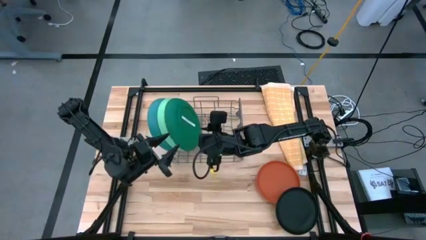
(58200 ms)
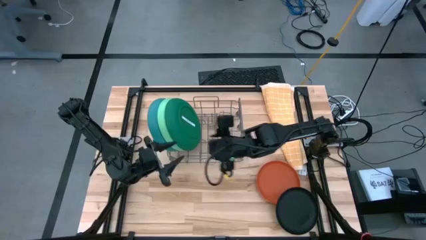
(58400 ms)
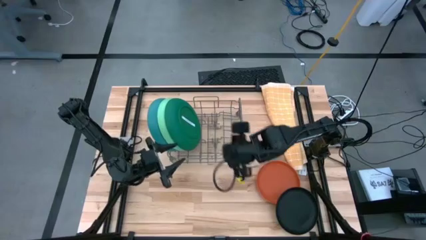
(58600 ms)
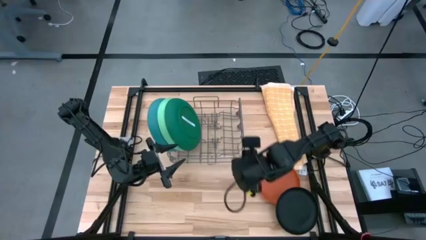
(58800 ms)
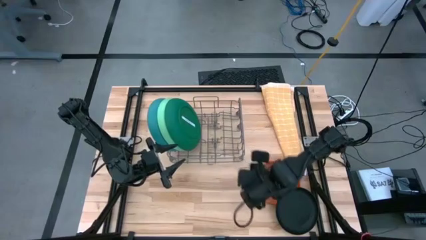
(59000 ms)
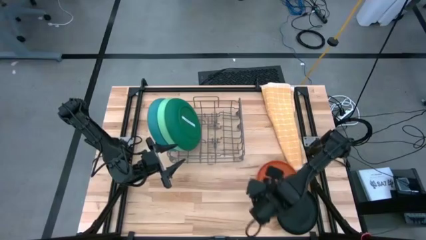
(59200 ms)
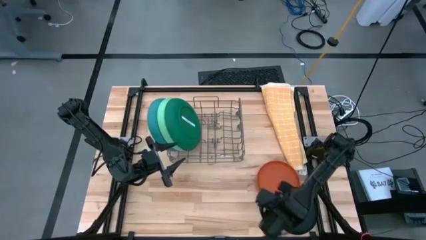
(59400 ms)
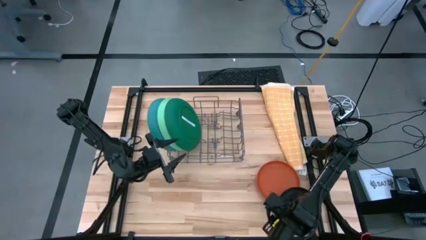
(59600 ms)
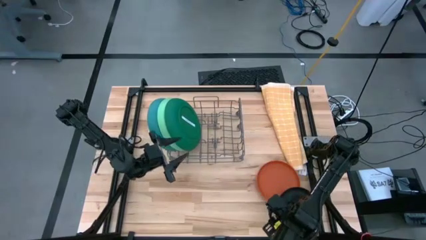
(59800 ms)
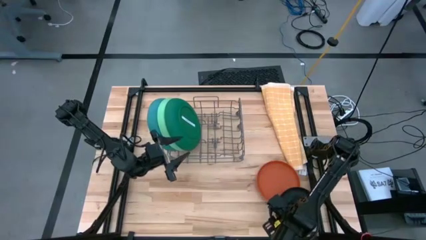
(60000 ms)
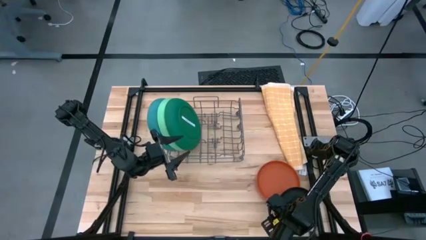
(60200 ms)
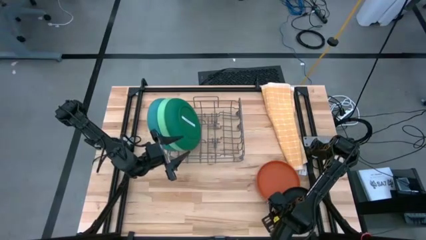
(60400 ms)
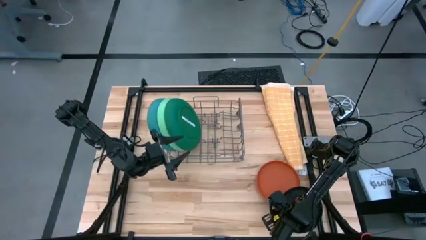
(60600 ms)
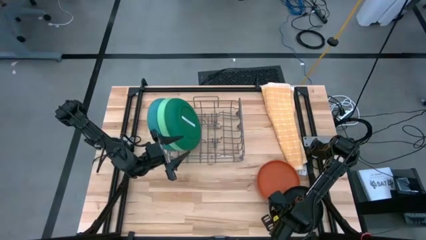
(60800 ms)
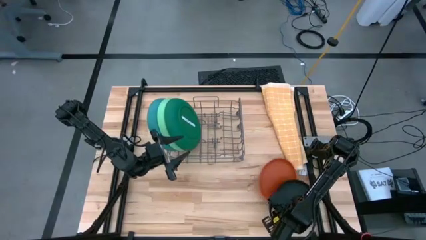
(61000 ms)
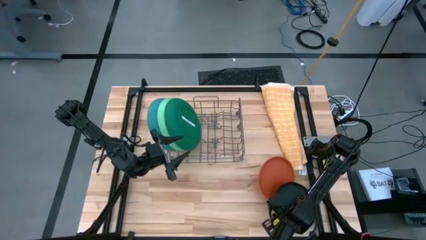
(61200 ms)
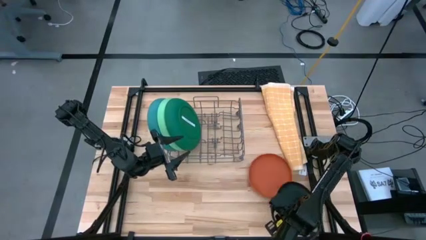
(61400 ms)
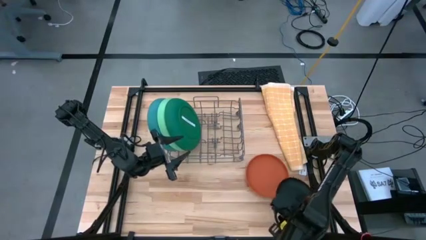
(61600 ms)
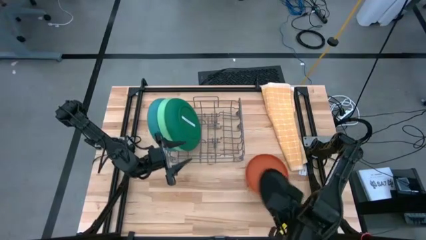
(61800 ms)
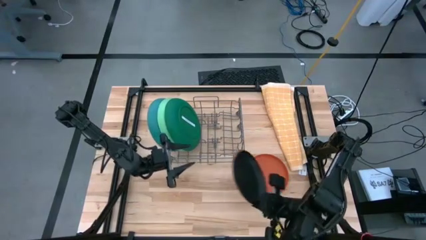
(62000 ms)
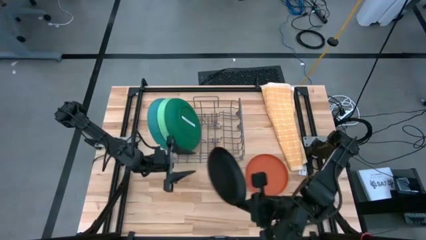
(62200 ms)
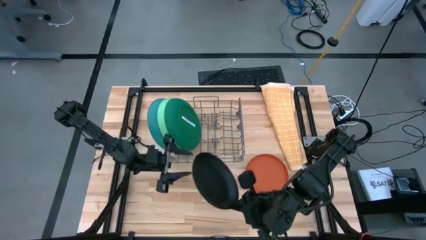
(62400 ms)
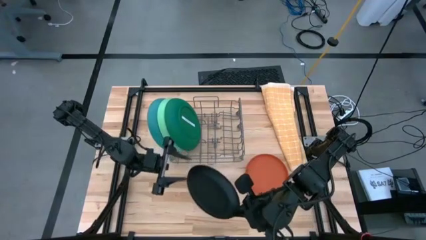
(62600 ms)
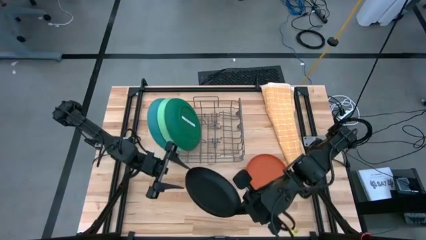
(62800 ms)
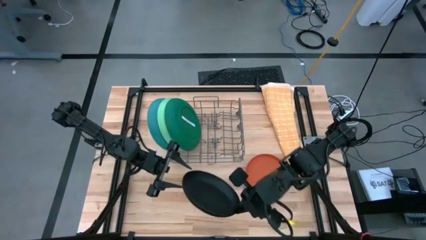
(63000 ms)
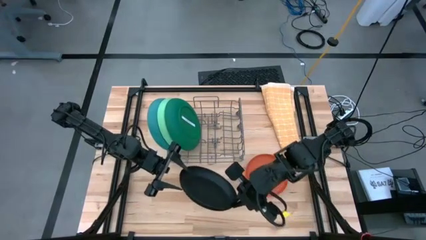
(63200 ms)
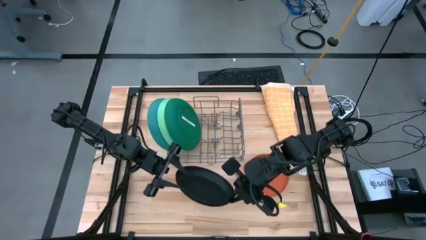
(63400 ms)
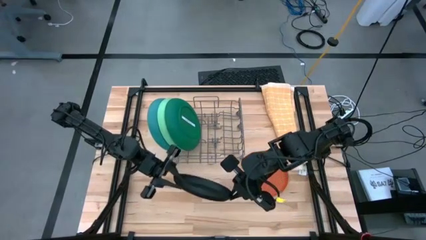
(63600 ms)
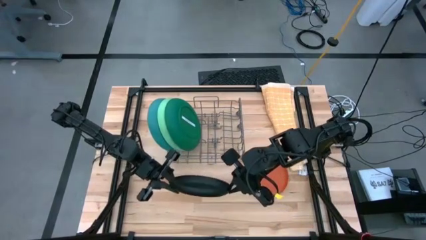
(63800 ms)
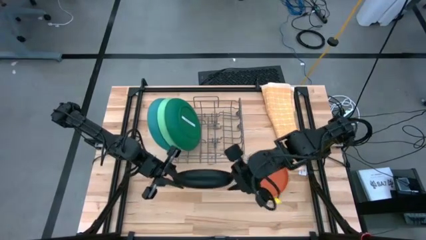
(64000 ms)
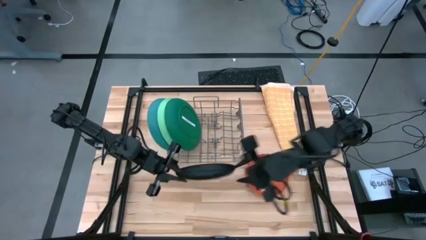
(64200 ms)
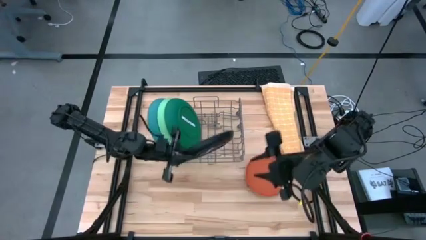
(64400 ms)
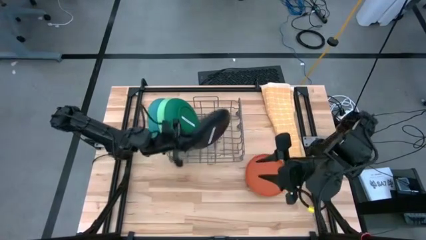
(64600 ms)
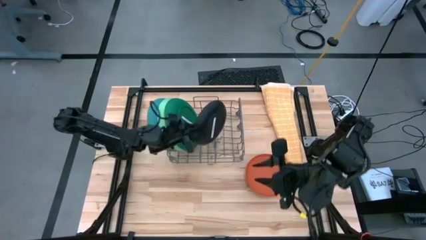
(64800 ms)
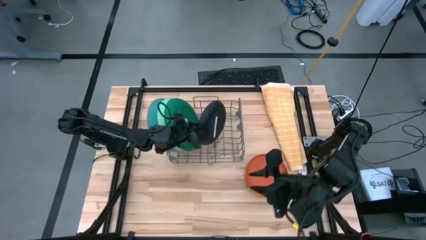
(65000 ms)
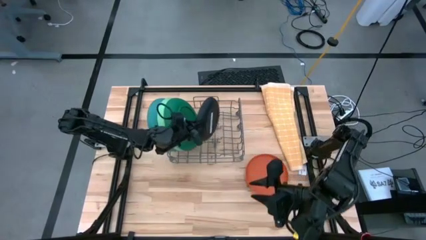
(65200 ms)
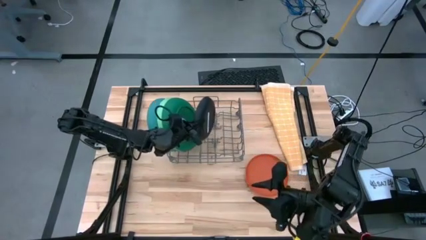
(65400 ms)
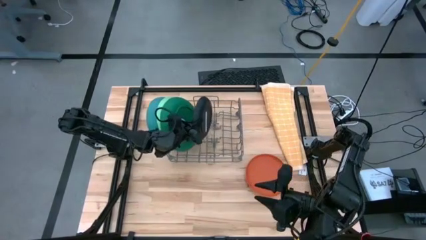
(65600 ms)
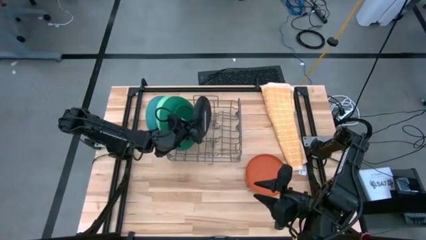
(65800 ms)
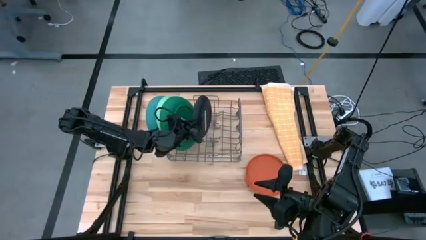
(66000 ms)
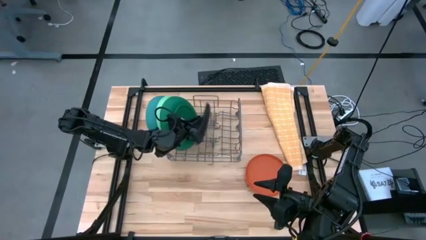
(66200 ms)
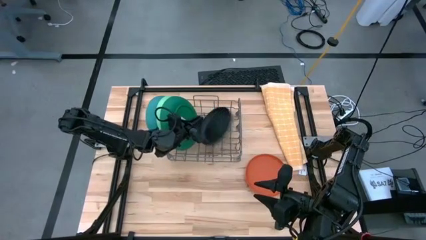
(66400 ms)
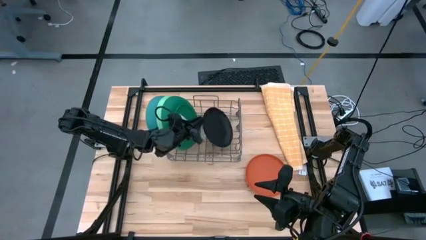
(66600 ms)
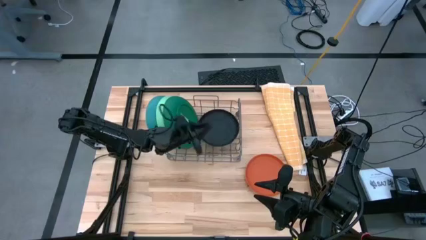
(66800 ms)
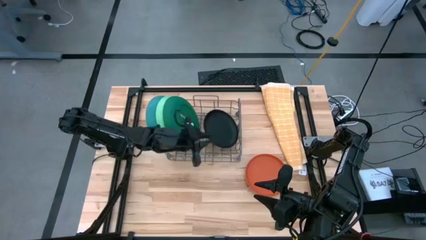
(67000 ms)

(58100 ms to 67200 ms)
Task: Sort dishes
Put the black plate into the dishwasher rack

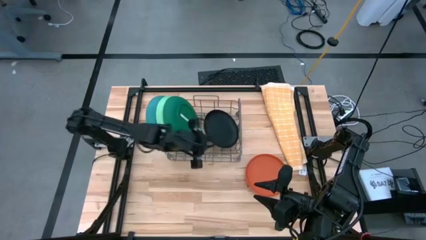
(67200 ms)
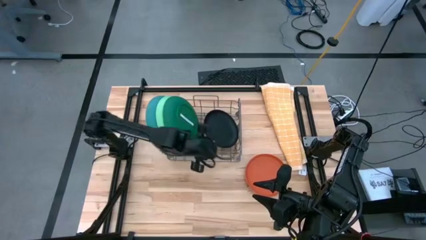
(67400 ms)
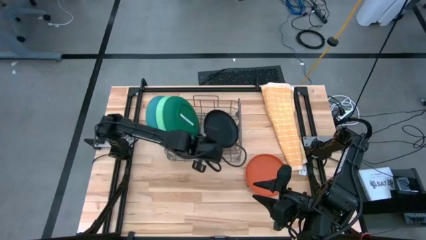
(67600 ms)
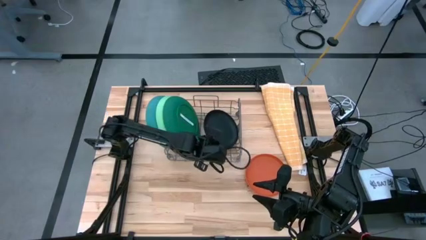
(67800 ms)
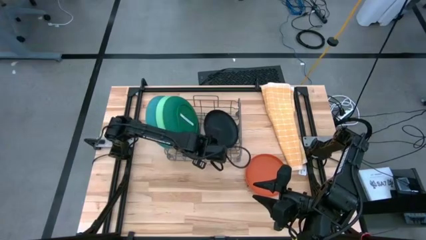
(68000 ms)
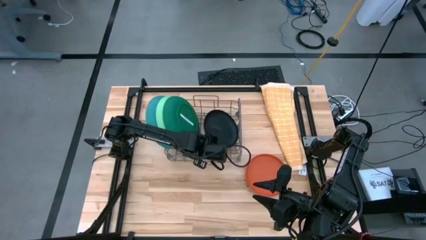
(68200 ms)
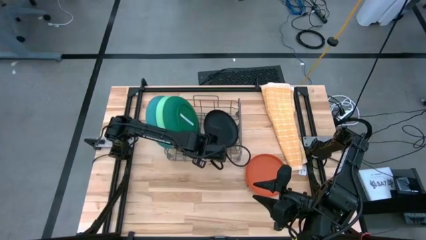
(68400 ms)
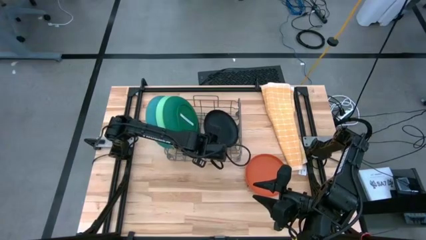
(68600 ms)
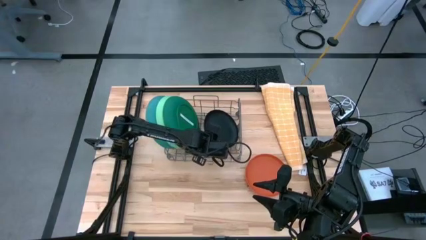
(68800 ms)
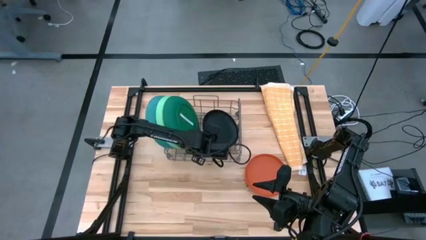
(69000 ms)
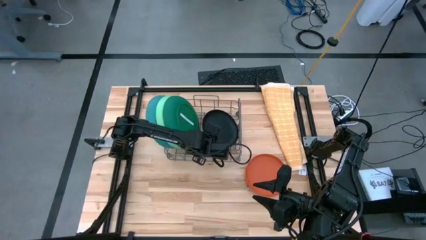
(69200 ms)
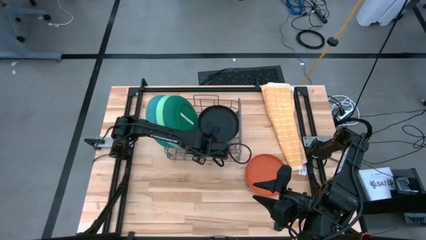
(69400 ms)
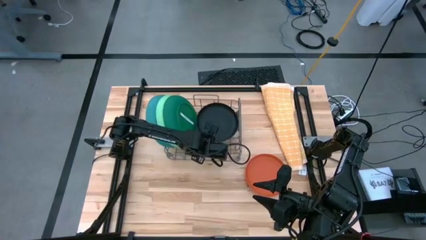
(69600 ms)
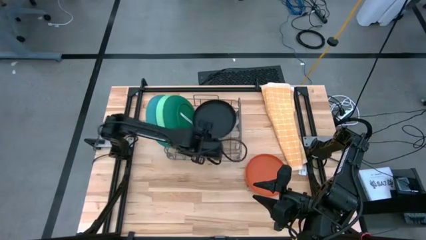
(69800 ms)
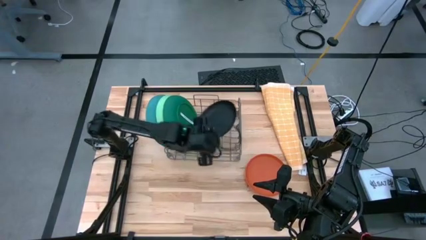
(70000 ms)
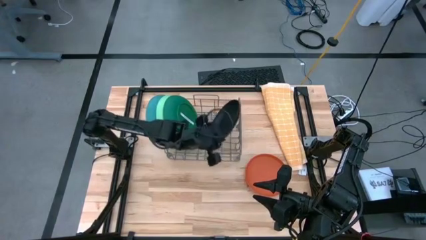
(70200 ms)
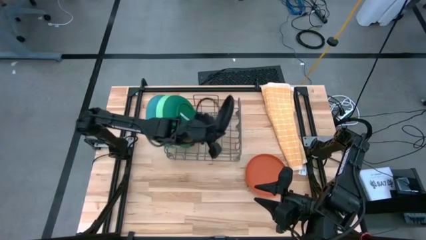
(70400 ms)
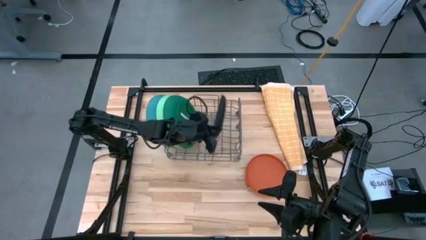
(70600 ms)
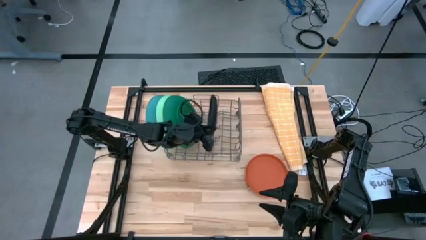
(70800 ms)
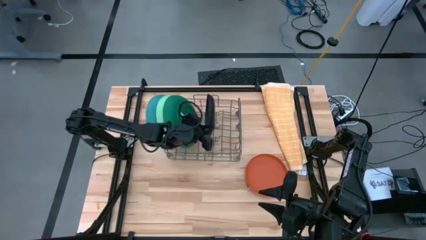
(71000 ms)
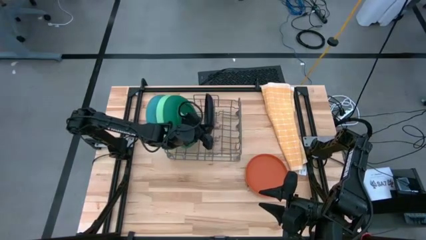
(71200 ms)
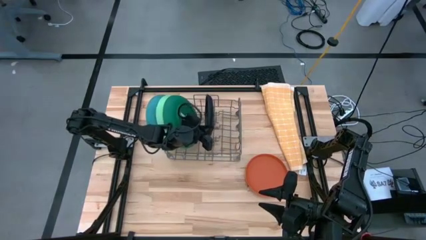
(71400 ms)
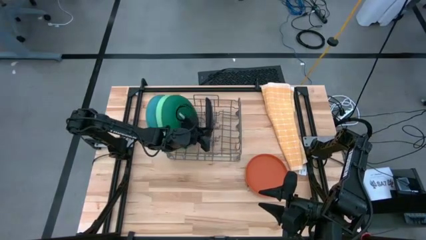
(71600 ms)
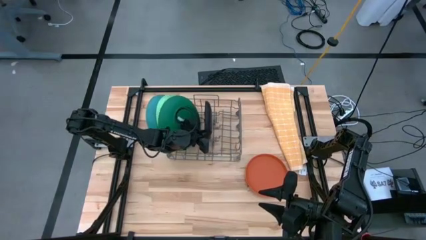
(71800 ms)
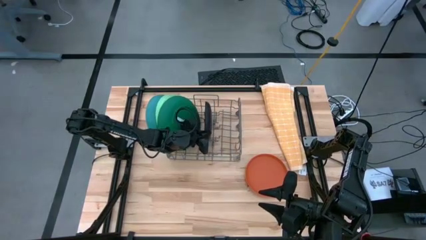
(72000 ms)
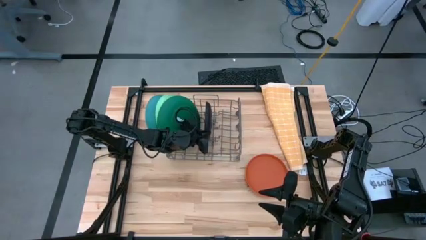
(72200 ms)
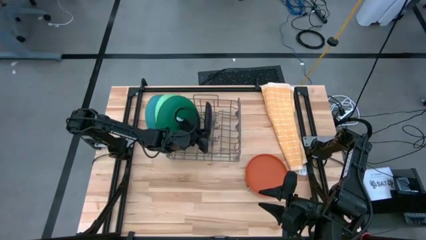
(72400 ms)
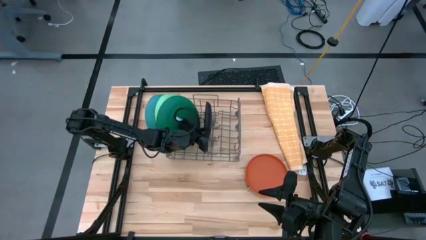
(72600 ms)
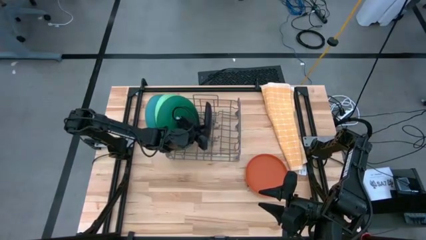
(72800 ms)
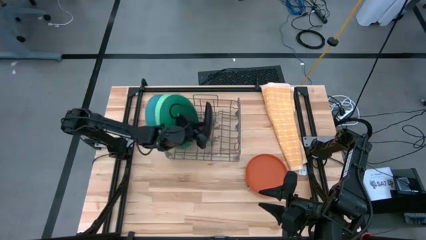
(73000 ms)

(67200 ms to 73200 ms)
Put the black plate into the dishwasher rack

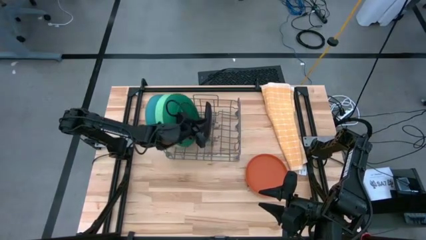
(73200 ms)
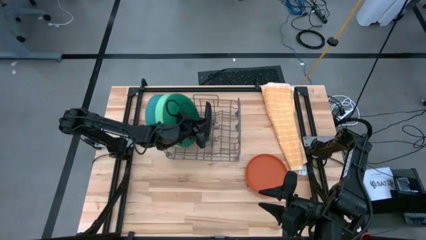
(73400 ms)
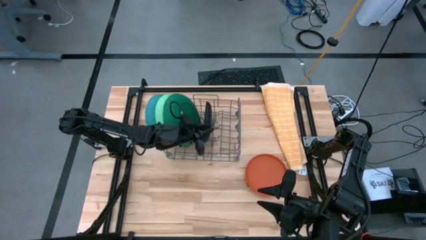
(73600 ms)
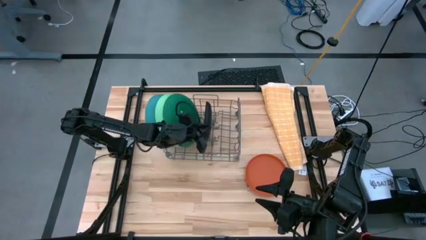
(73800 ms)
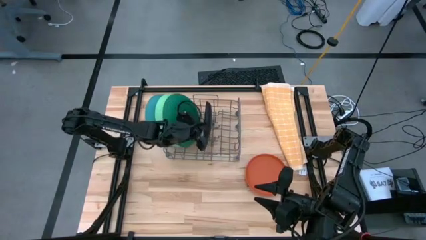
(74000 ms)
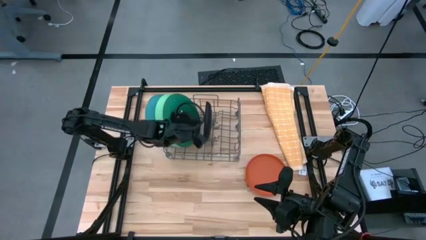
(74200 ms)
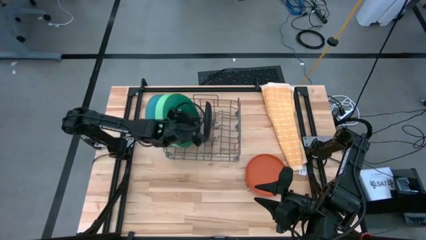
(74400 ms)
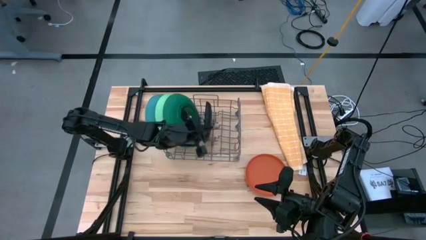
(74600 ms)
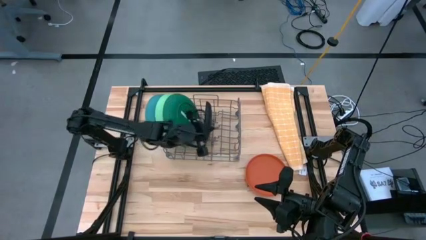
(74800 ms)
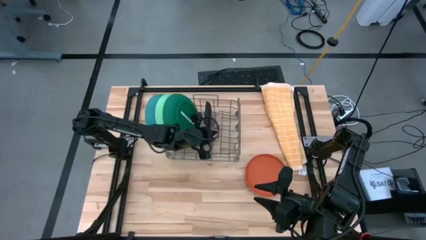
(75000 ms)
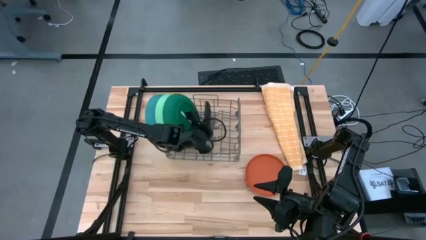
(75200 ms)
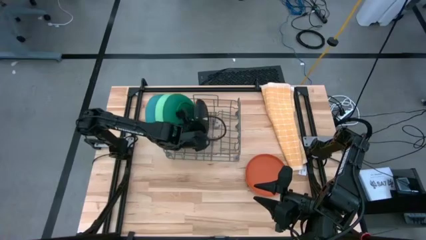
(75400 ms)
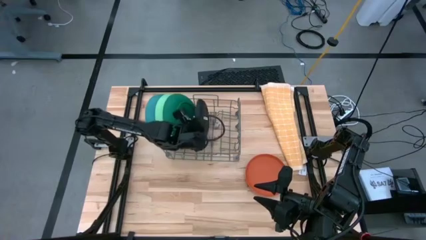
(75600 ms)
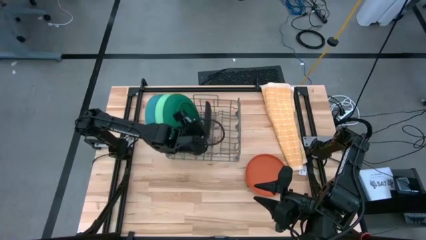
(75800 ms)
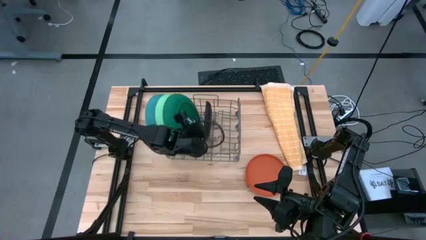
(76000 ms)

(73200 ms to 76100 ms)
Adjust the black plate
